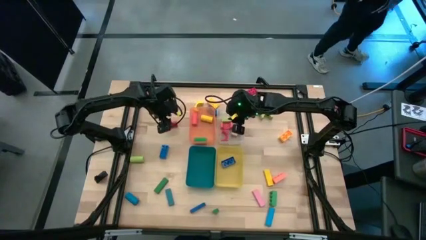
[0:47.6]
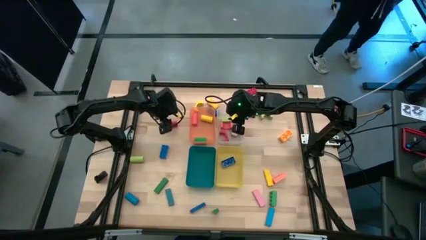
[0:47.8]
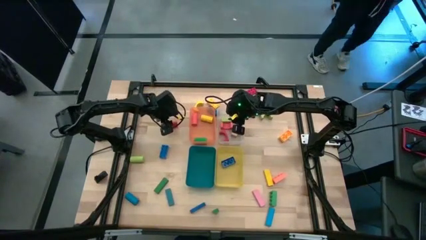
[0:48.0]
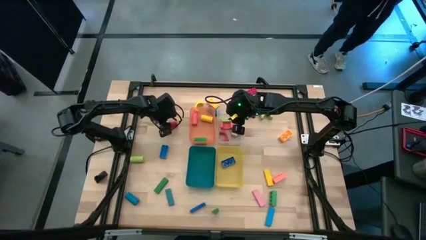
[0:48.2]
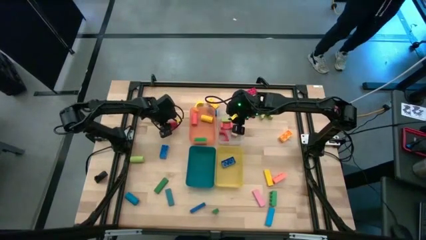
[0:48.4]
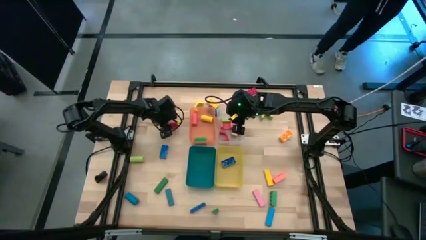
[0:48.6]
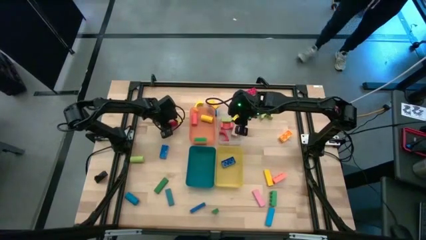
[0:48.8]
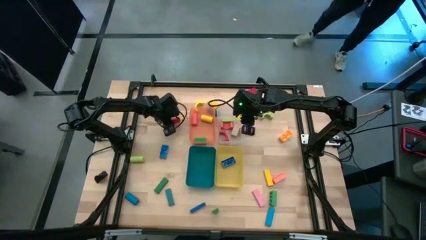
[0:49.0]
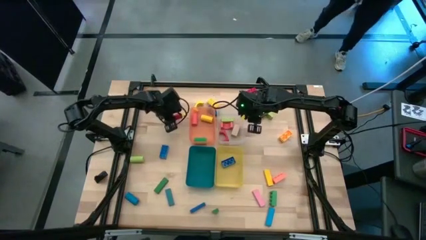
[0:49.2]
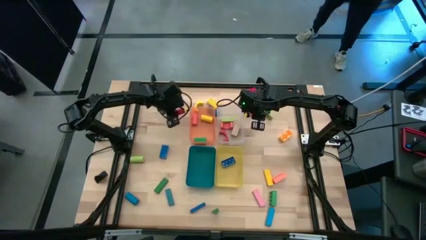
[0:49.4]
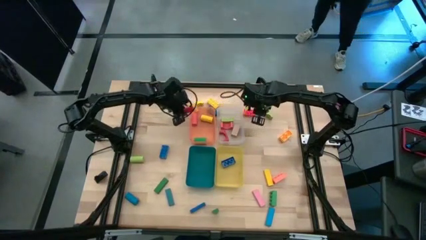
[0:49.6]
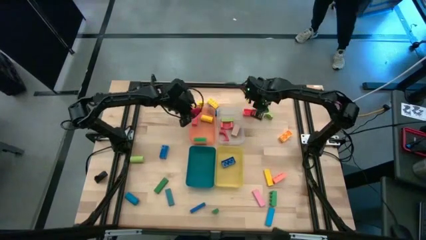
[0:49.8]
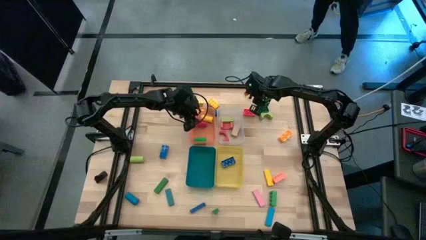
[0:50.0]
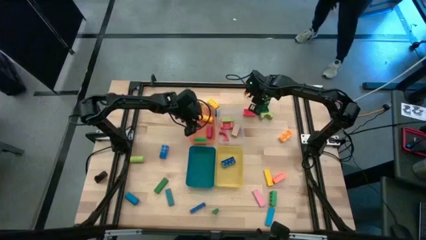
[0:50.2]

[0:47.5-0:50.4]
Task: Sort blocks by size
Put the red cylindrical block into the orange bin

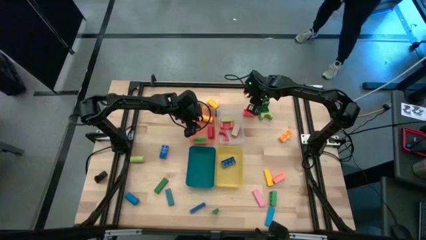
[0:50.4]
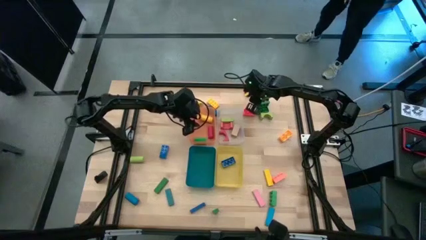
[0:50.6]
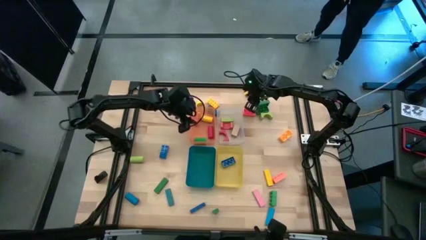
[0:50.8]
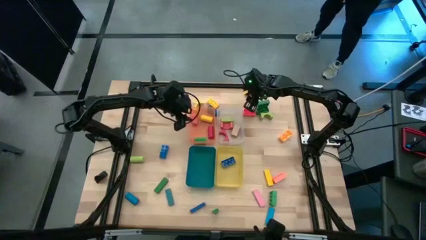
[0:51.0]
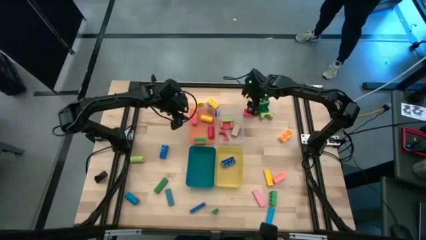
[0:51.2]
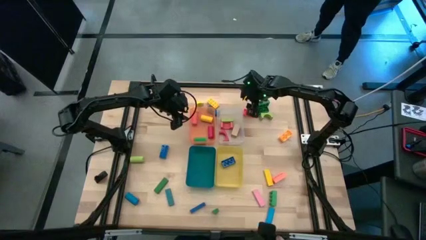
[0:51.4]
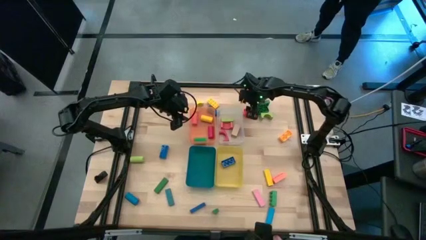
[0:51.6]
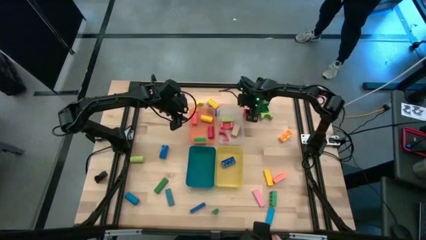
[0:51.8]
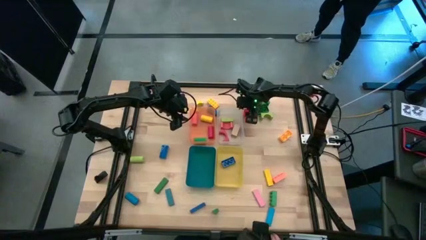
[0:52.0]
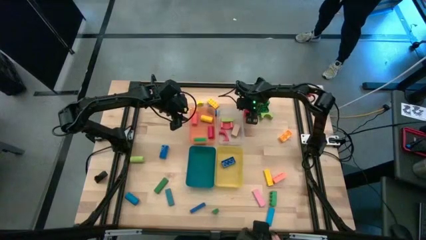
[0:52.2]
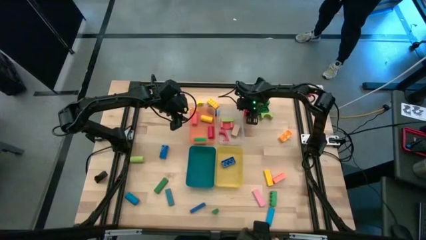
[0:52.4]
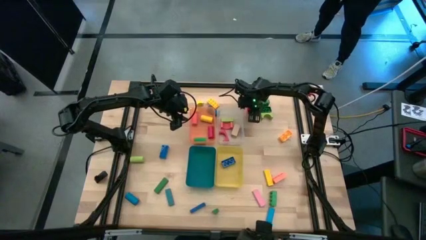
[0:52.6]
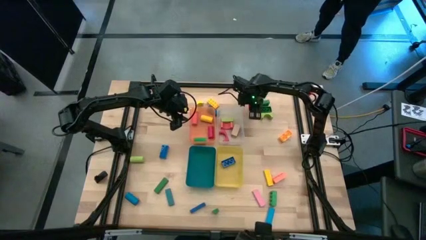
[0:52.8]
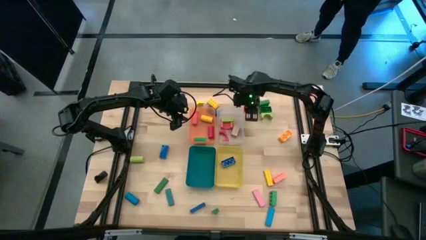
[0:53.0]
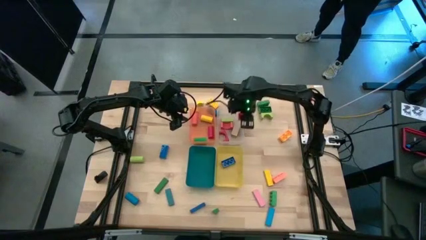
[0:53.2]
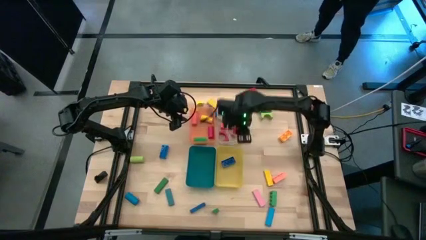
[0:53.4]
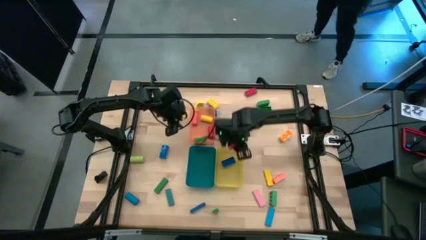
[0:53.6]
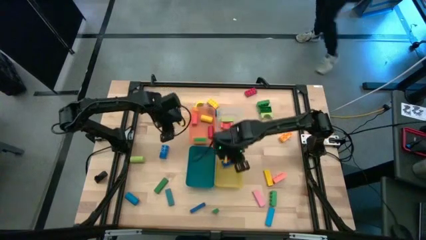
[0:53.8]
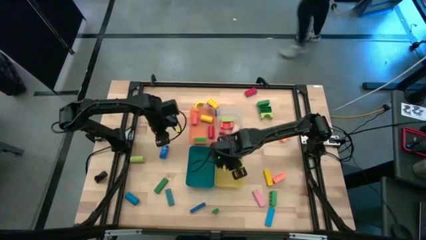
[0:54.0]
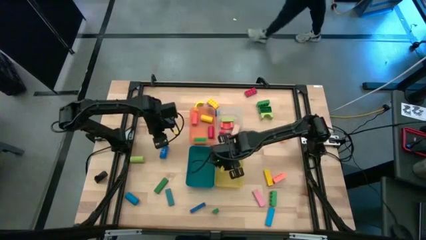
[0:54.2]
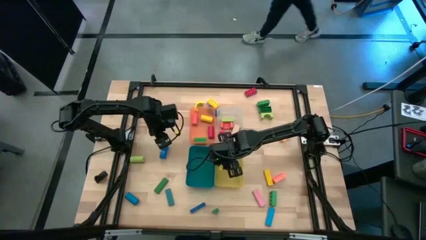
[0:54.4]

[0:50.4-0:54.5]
Put the orange game piece into the yellow bin

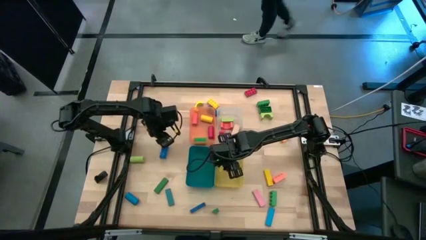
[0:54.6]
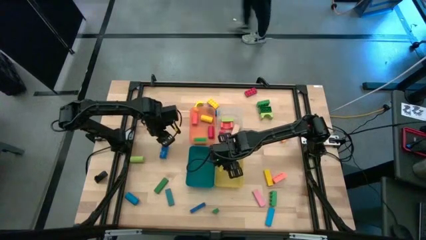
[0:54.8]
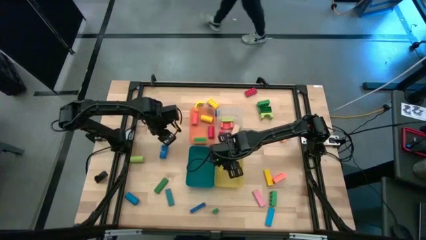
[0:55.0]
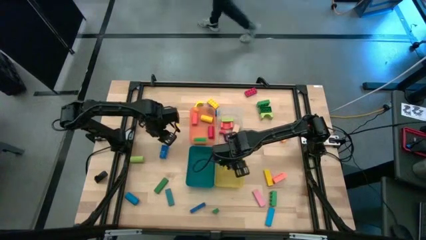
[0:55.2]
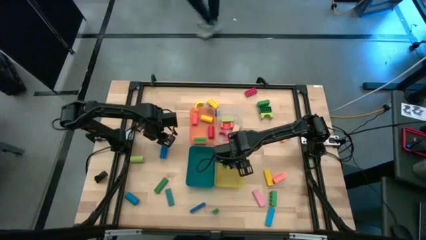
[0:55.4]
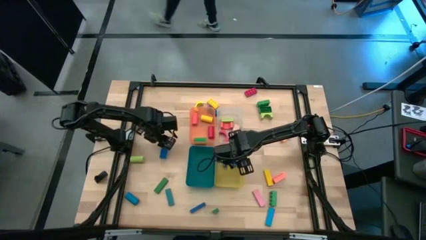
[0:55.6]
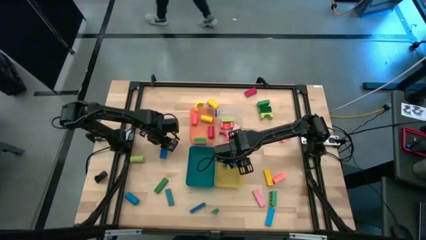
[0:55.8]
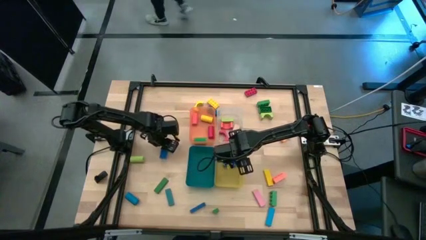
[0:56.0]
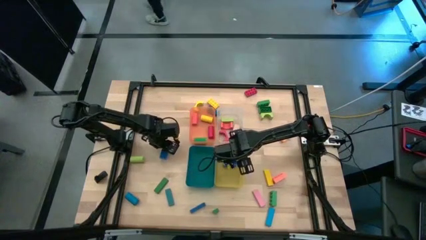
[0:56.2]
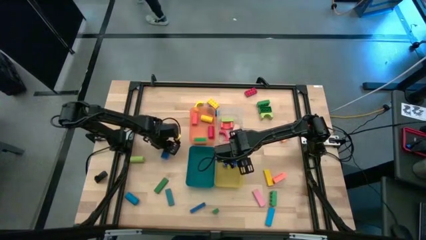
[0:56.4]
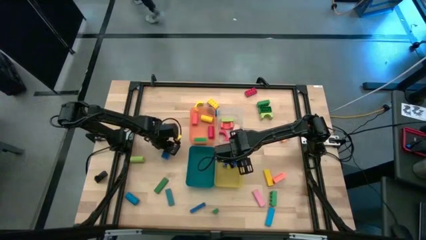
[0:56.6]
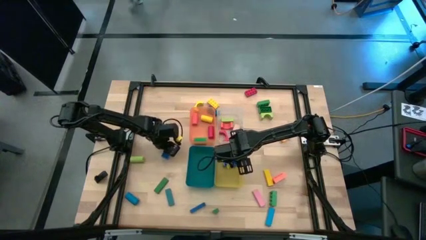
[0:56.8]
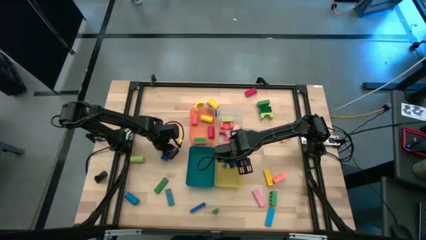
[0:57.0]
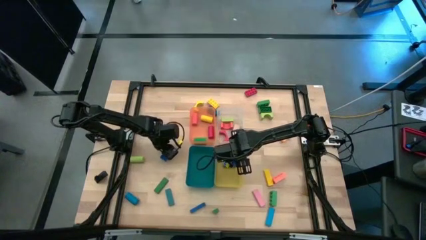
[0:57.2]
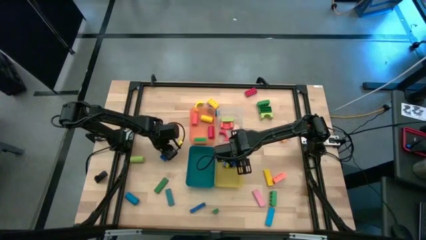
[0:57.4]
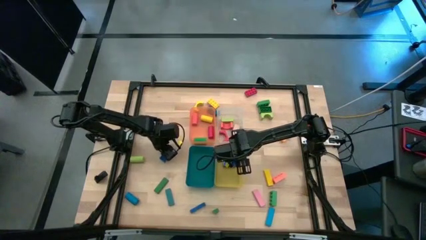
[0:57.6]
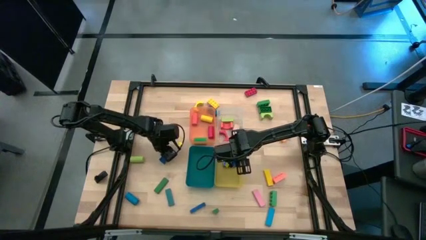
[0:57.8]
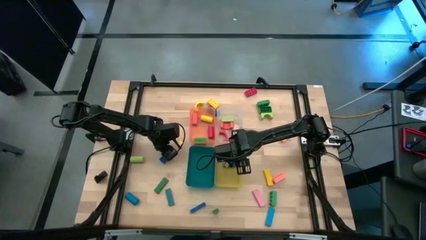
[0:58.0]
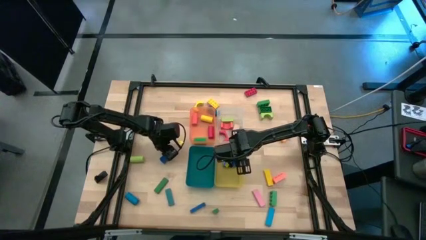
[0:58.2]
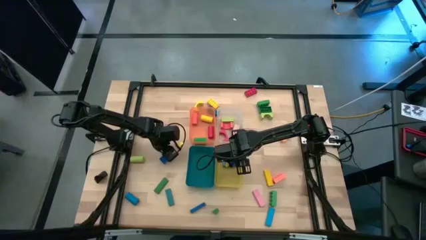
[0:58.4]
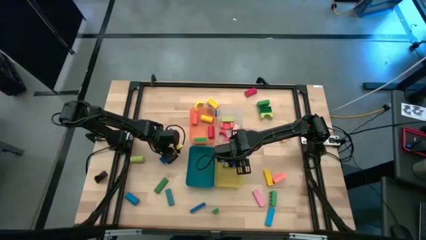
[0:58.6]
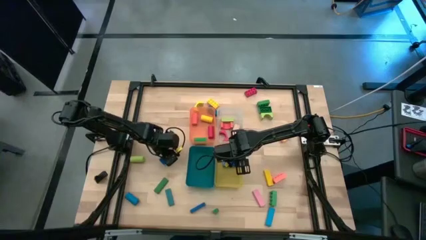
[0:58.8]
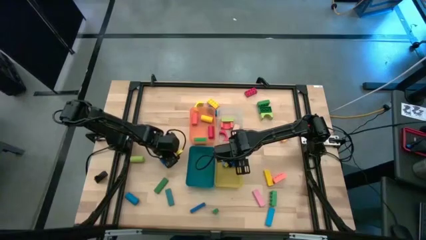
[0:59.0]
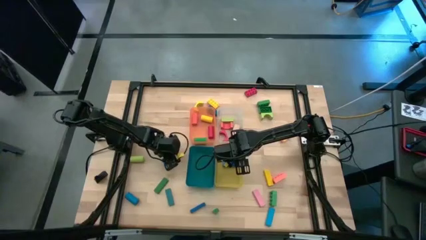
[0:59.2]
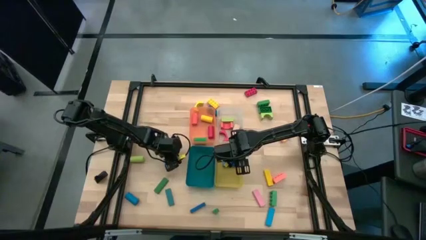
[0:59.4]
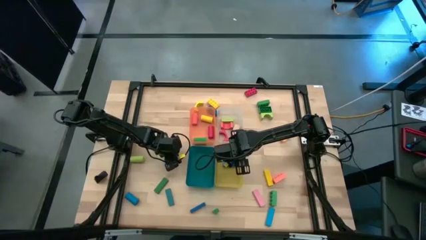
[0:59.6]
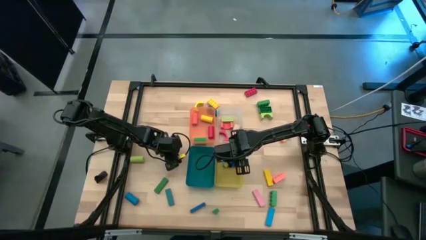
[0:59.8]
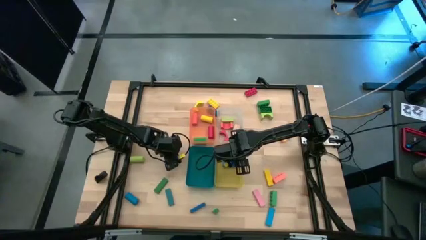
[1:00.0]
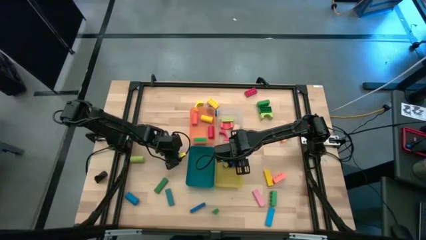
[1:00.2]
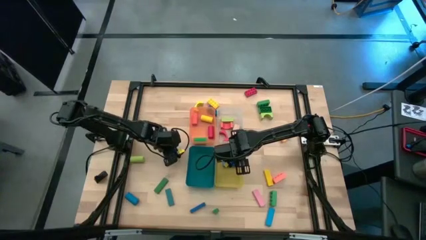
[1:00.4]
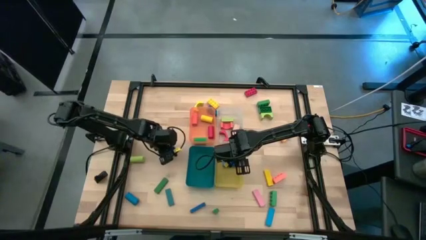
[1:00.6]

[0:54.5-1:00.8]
Put the blue game piece into the yellow bin

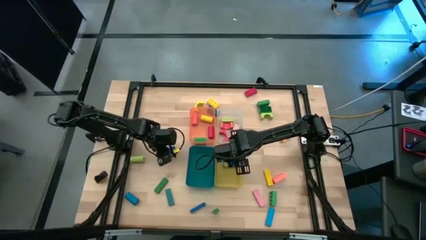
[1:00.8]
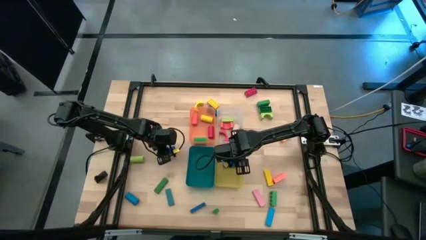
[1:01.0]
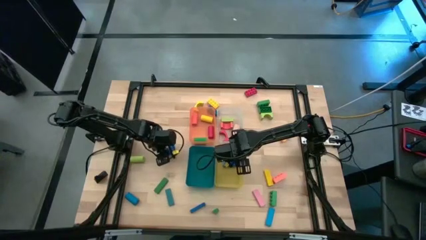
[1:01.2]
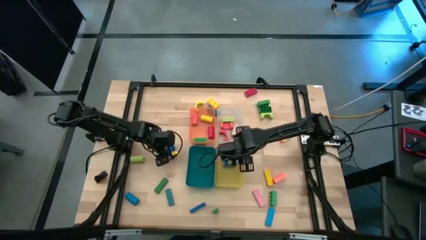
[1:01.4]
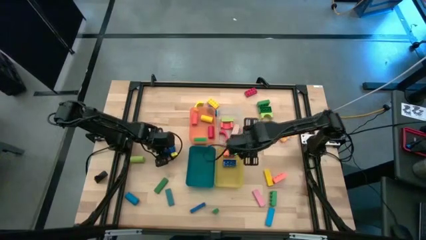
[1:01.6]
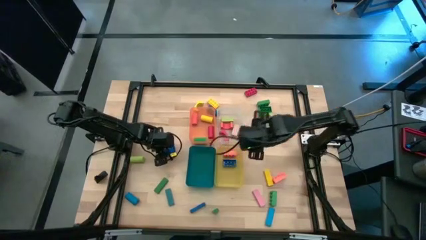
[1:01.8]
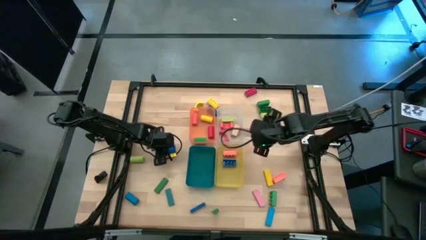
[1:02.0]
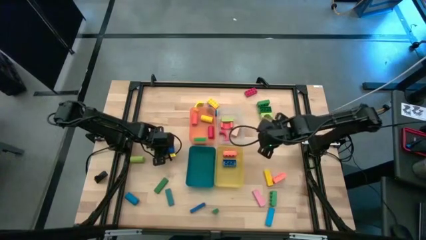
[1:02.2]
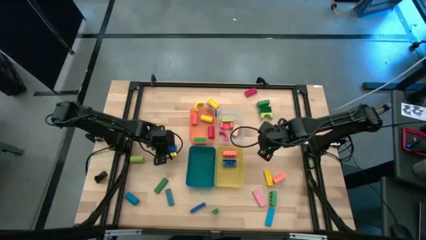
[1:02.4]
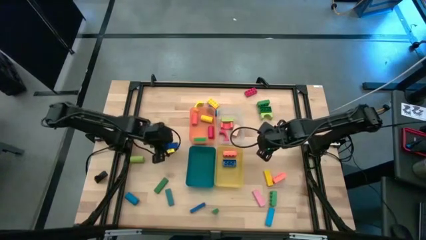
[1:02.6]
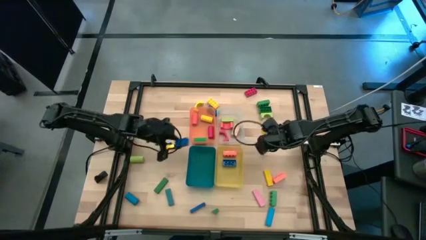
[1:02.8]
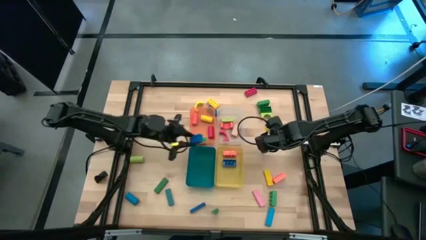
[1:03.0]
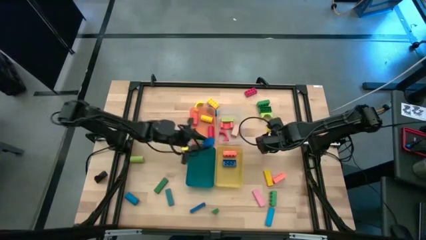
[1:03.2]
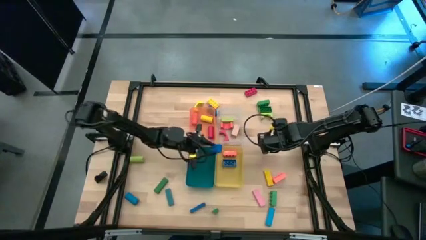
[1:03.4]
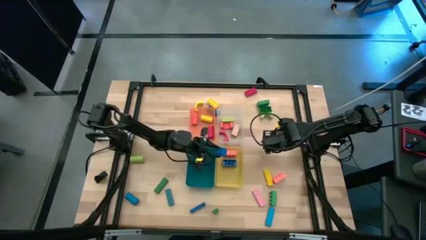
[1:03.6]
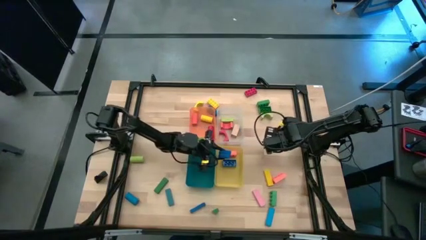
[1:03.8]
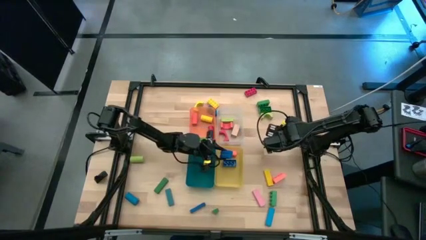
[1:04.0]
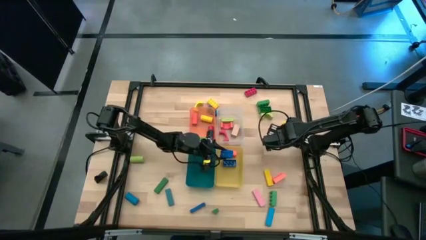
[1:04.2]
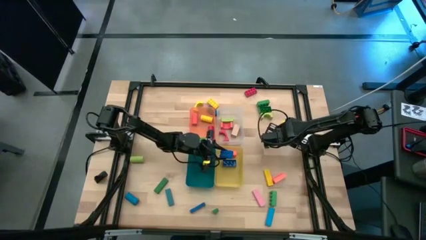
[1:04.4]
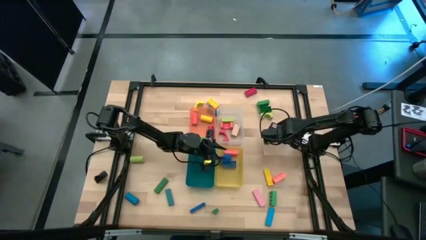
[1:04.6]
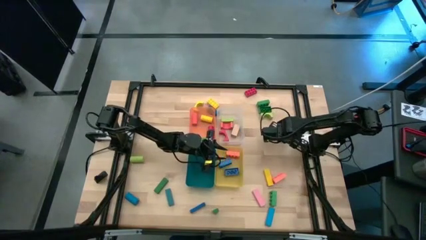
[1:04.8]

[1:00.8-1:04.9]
Put the blue game piece into the yellow bin
